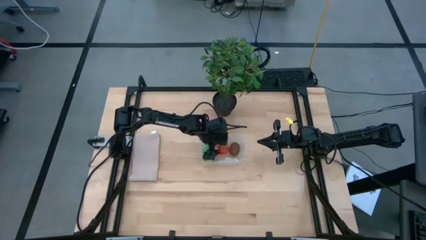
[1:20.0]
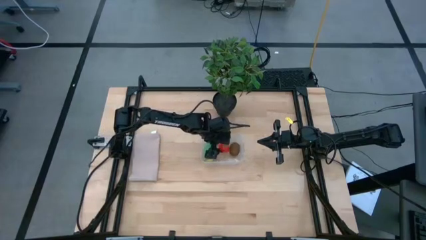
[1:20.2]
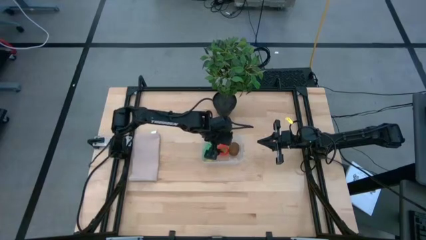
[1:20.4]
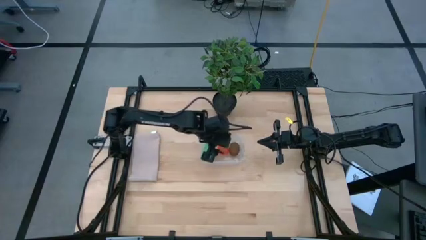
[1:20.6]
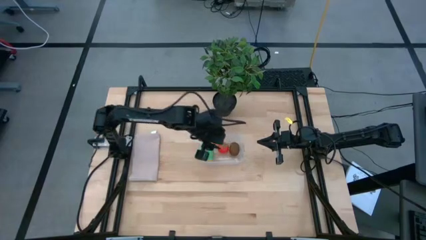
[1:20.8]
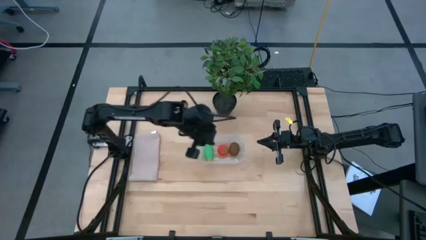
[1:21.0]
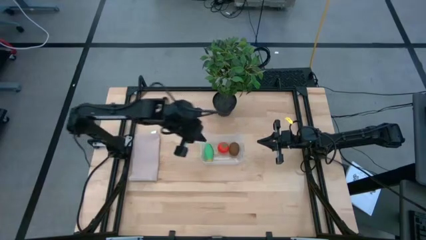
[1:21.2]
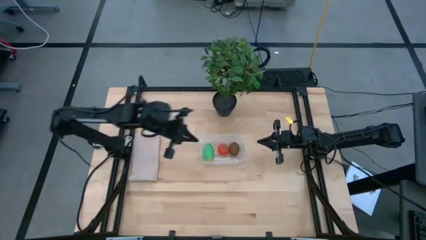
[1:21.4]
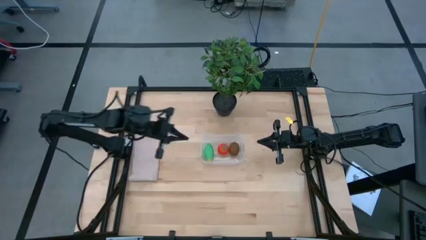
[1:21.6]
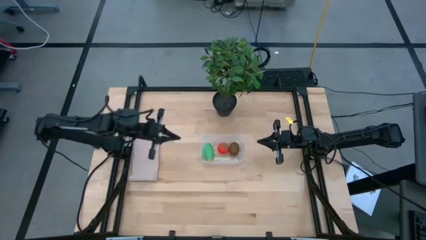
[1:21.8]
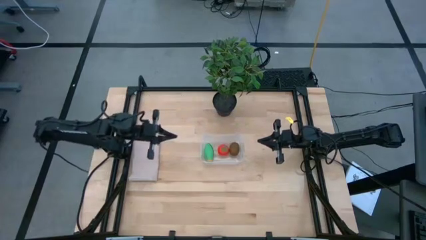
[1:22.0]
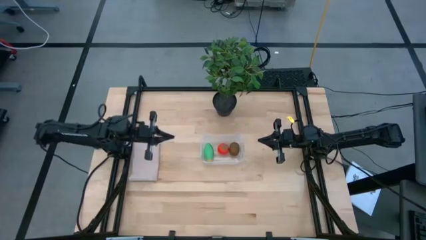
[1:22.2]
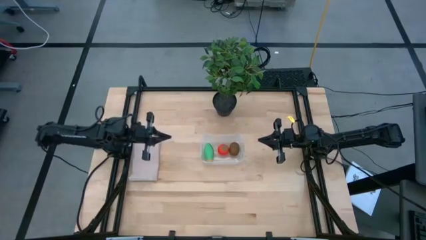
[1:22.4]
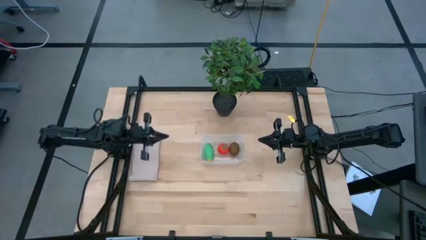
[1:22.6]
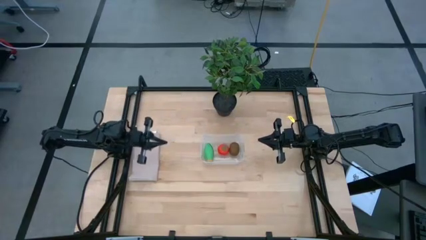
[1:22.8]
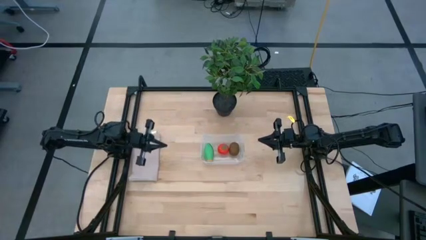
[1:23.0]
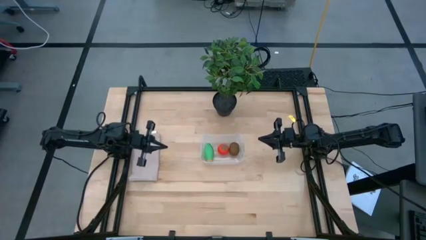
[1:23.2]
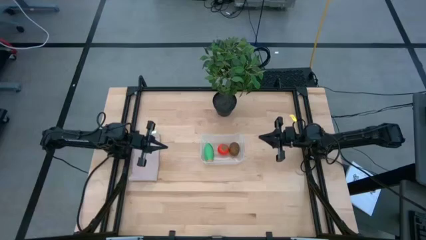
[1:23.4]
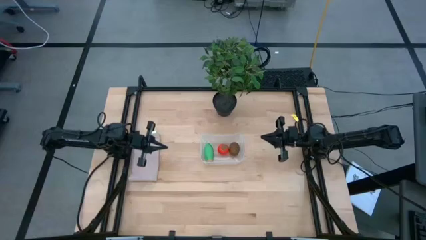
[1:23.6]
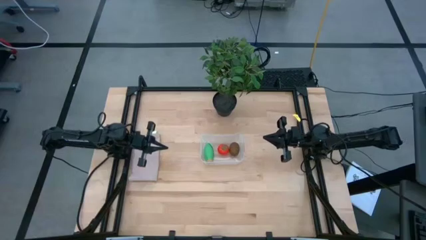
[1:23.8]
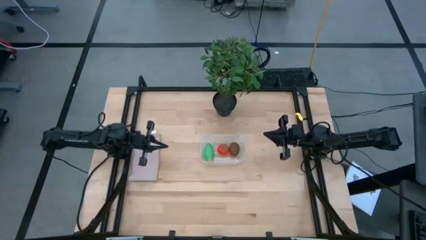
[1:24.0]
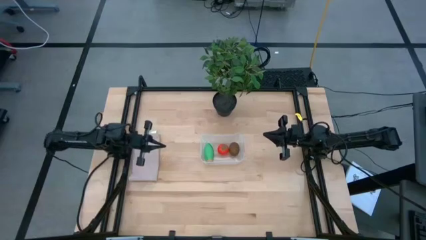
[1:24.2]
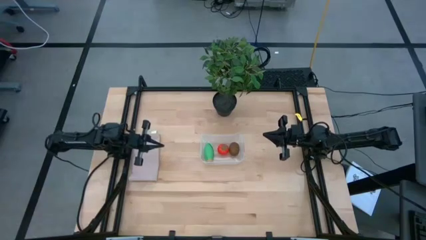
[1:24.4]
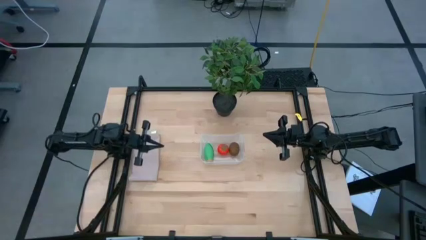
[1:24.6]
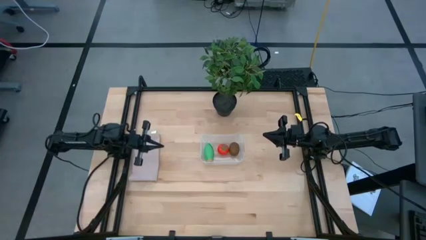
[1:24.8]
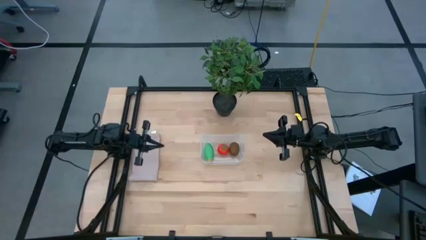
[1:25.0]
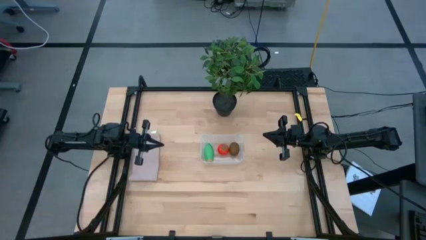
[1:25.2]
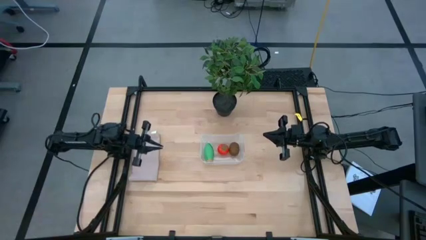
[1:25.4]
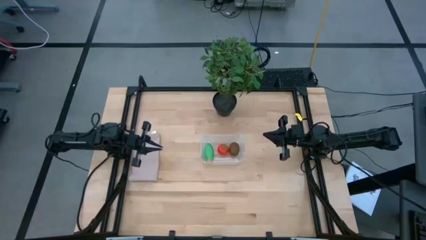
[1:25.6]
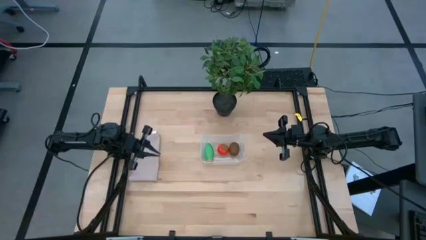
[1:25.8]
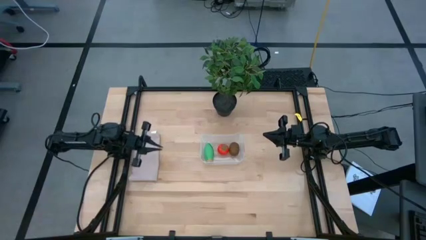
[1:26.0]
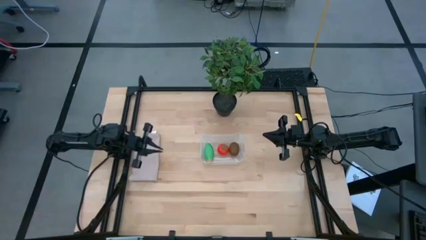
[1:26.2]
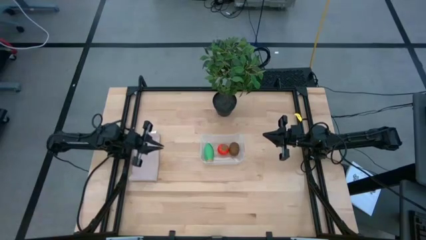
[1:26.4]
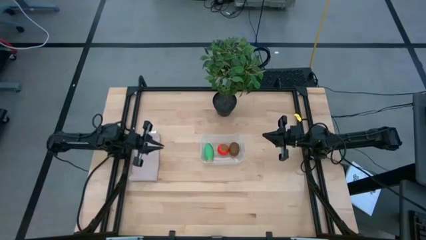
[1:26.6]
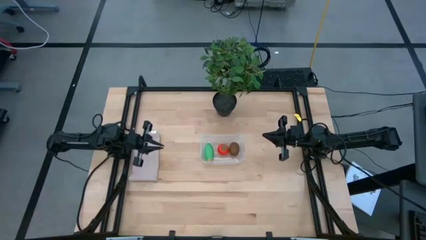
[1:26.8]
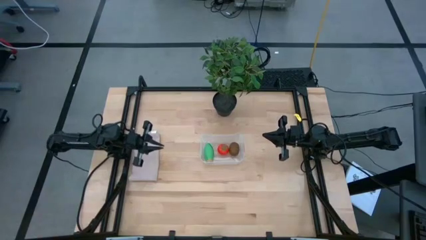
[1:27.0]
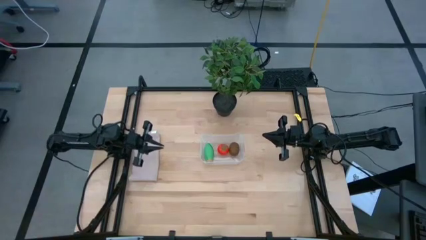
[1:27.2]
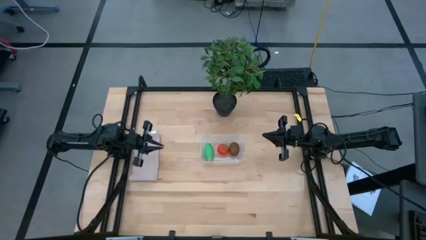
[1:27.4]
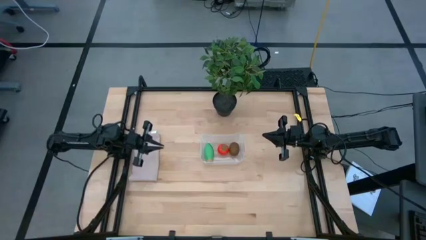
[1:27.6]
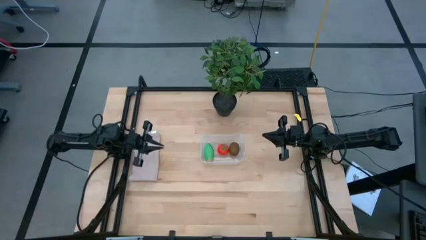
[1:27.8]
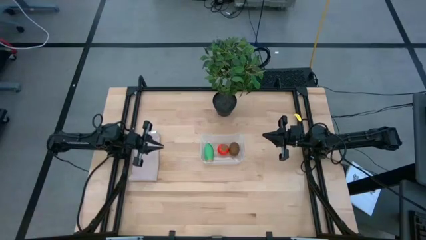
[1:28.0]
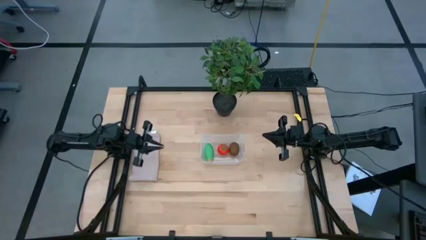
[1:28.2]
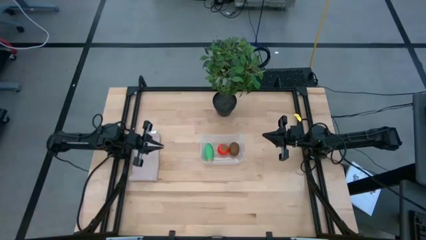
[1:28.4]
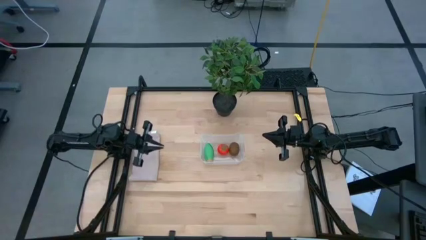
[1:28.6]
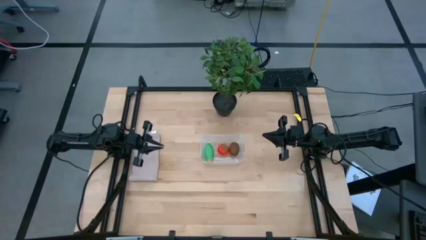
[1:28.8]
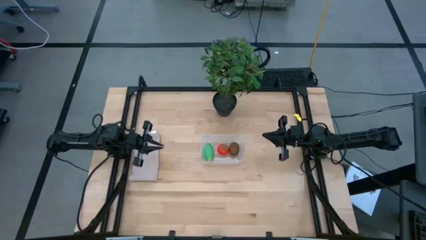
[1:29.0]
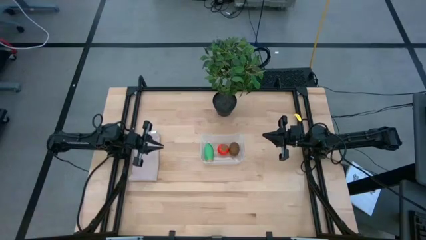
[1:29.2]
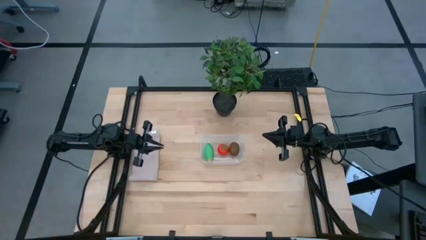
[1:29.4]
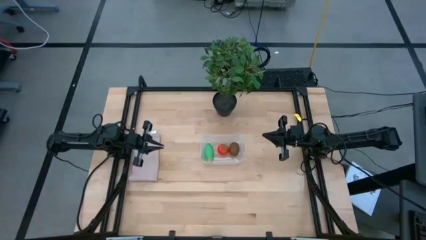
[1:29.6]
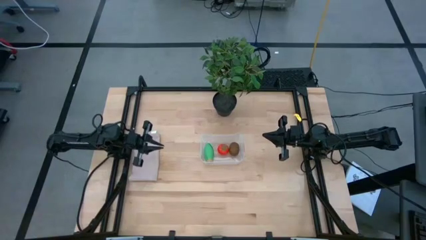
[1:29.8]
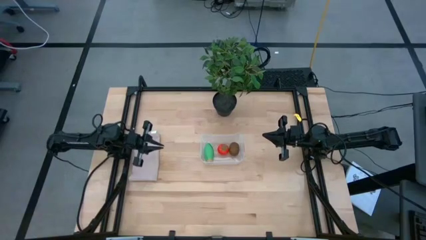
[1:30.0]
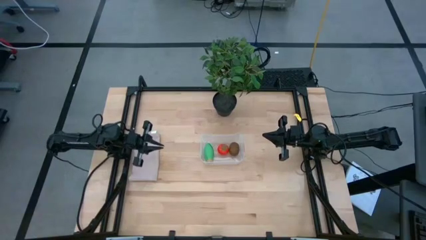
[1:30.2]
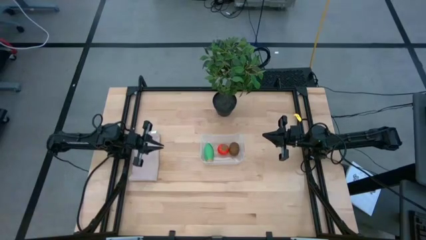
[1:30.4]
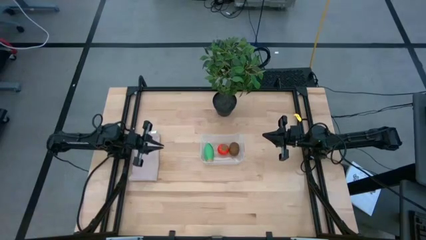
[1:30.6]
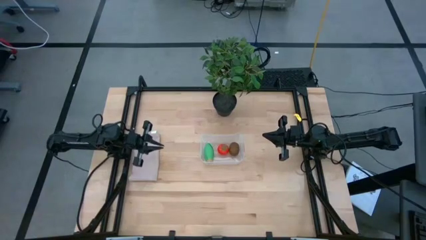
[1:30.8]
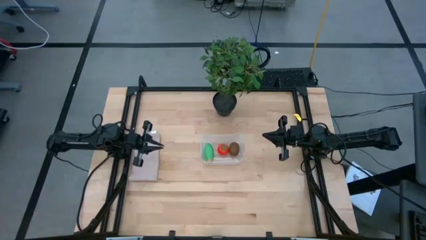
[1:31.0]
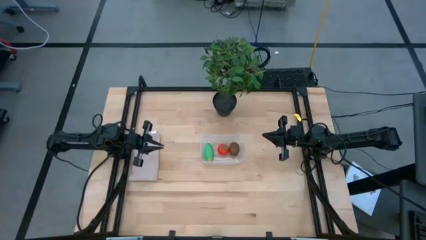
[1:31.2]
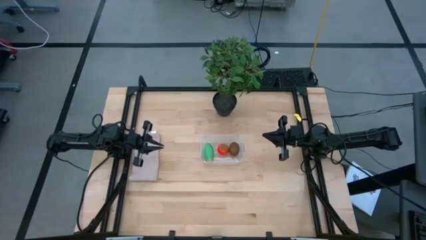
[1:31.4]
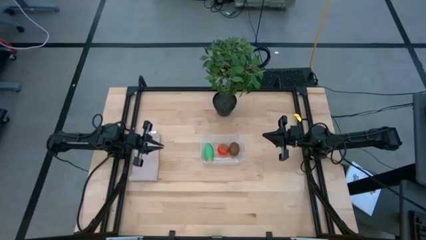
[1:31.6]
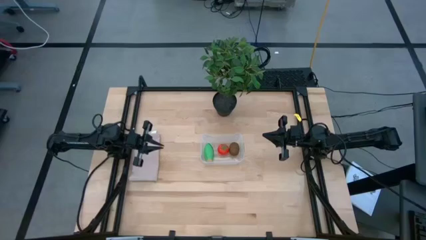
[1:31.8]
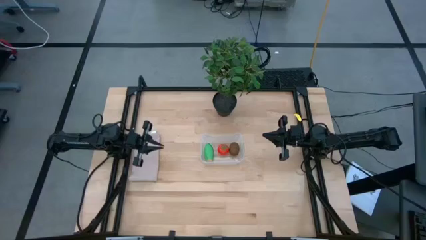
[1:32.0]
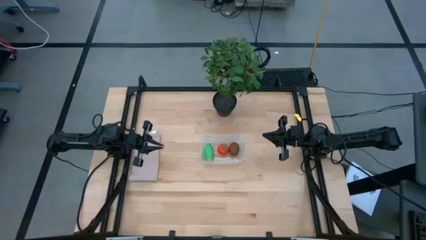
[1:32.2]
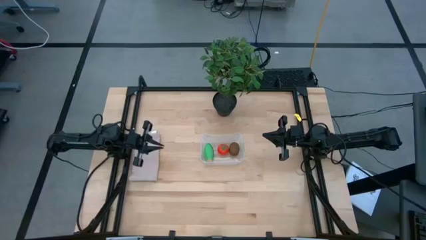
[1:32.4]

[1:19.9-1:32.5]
Task: Pick and placing Produce into tupperware
Return to Home Position

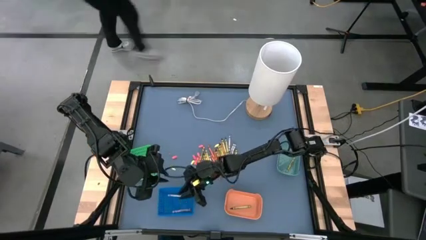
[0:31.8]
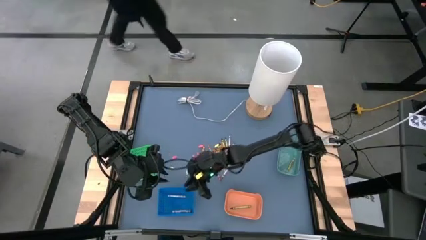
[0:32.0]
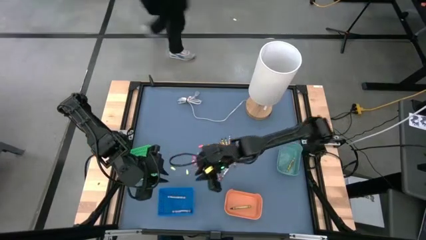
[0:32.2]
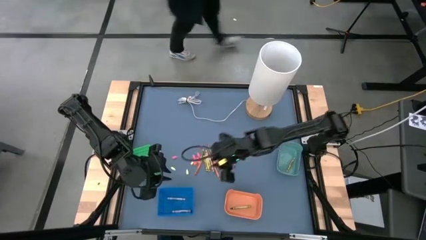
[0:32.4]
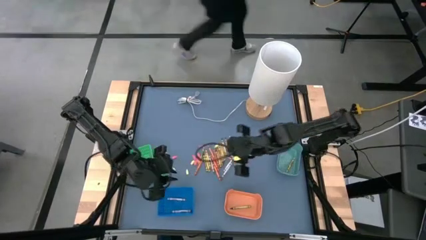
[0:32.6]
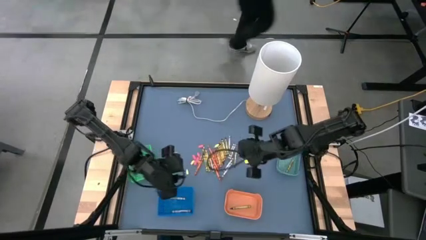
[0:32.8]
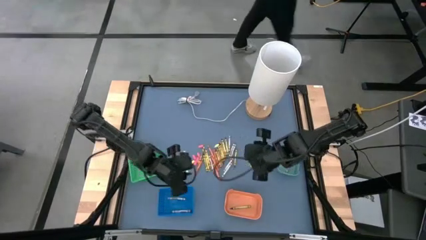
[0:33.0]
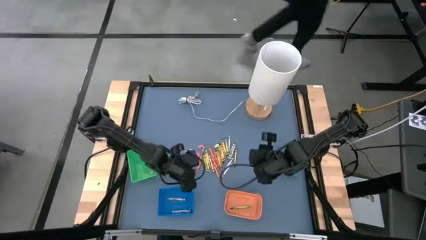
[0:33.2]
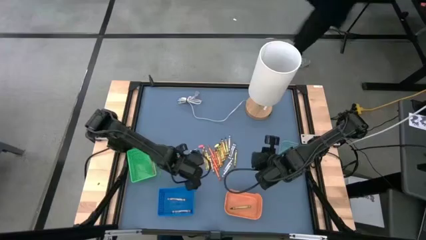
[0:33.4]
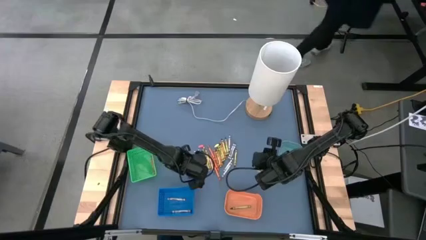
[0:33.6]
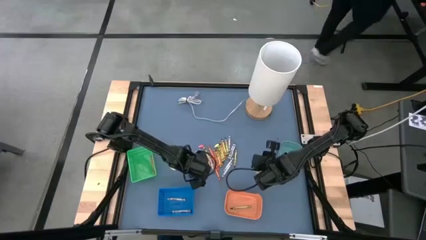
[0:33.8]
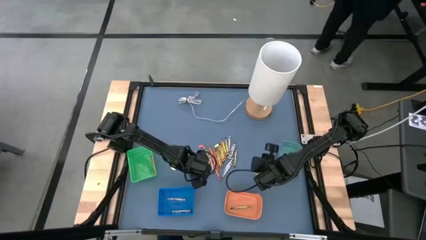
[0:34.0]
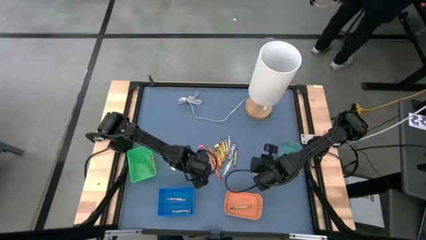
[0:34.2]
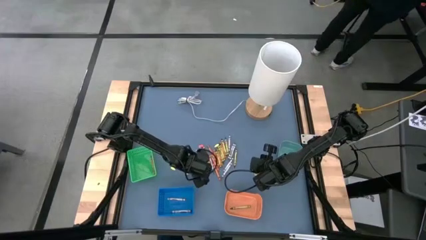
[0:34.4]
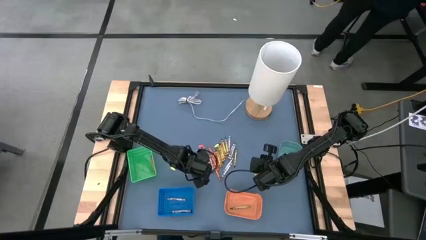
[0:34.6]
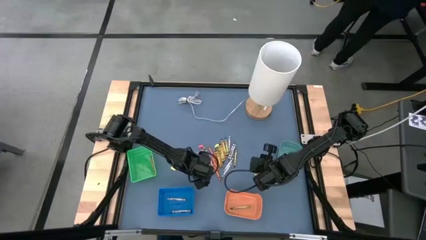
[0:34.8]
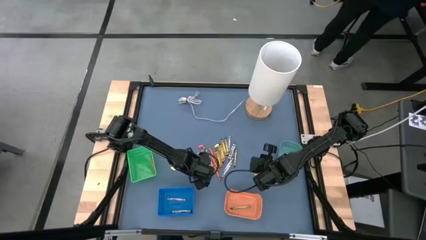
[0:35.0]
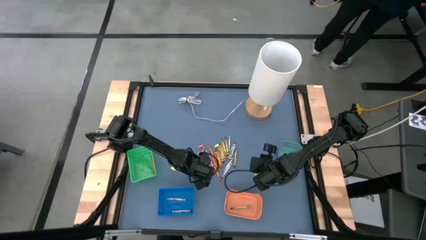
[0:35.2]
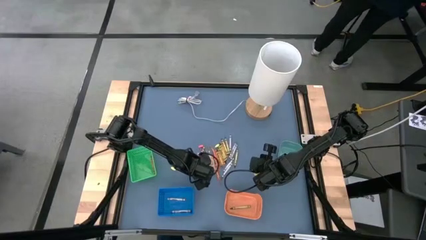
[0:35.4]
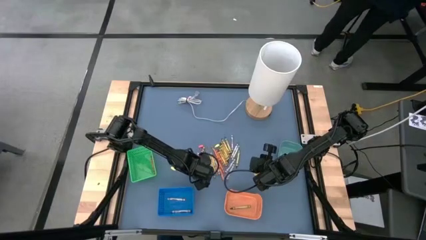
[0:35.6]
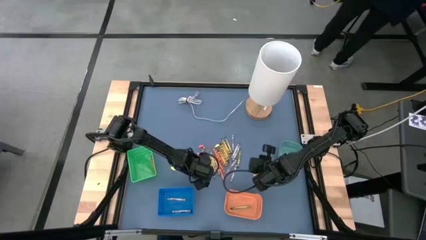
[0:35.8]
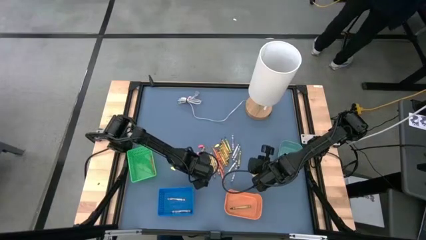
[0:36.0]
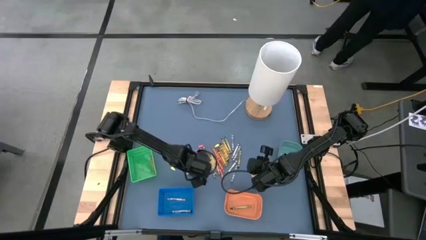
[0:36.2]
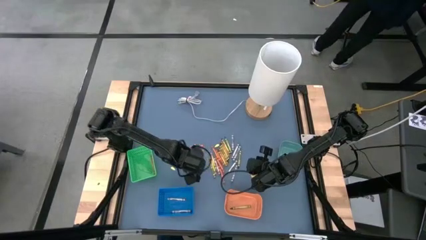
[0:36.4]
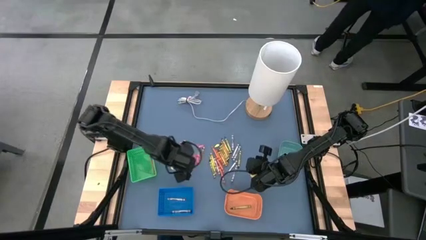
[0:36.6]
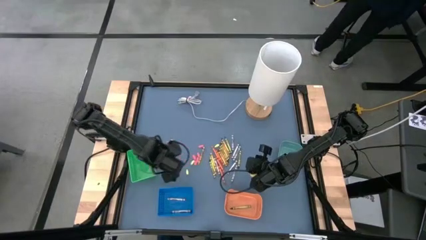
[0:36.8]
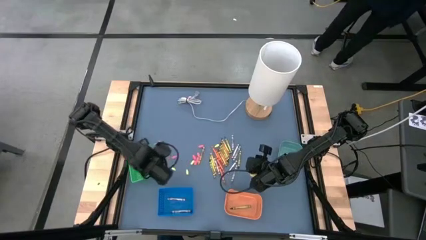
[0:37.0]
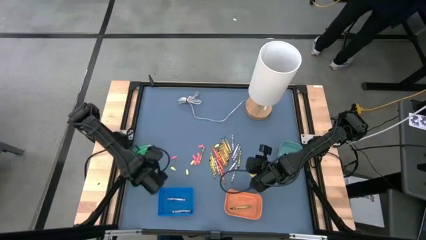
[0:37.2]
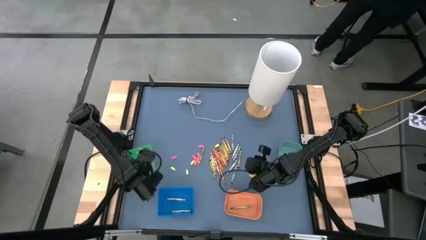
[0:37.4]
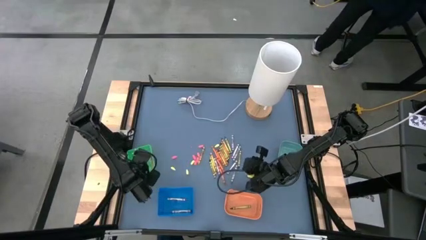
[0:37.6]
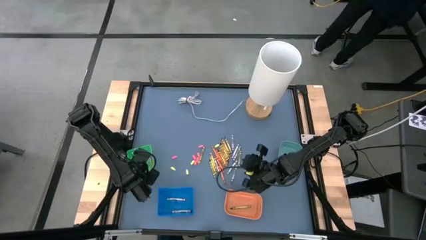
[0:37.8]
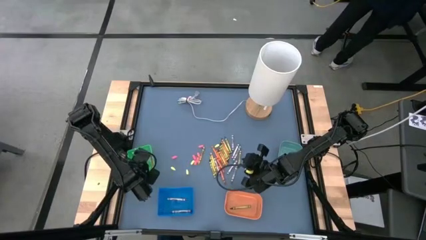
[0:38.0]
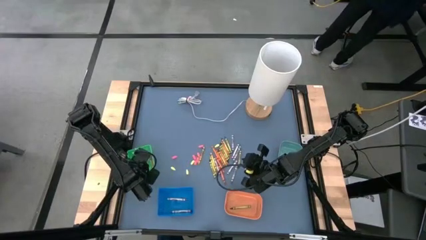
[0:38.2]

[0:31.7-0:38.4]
Task: Sort crayons
Put the orange crayon into the green bin
